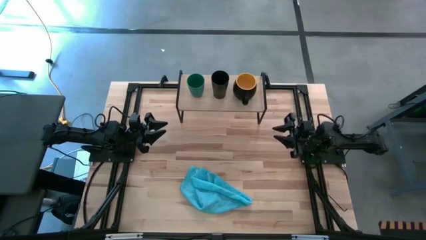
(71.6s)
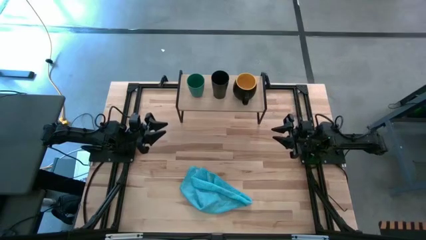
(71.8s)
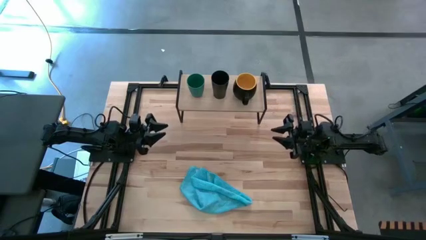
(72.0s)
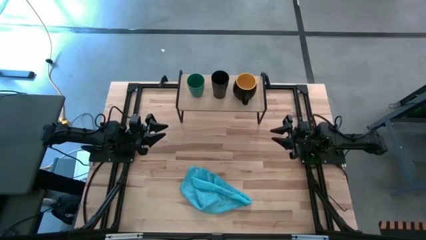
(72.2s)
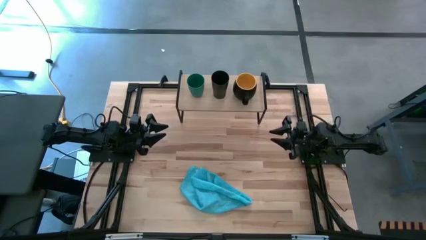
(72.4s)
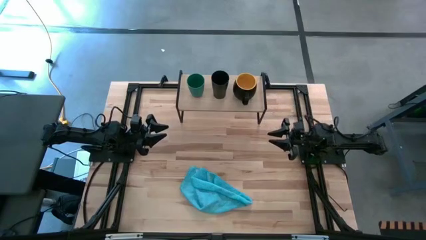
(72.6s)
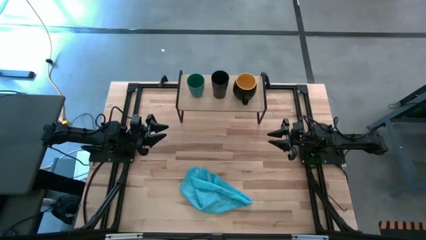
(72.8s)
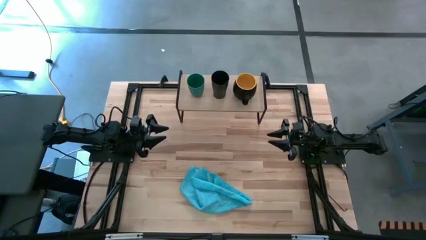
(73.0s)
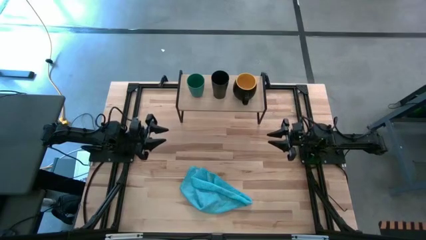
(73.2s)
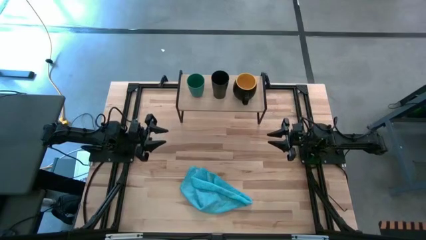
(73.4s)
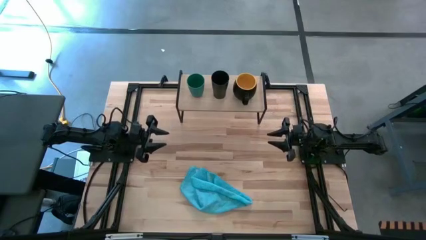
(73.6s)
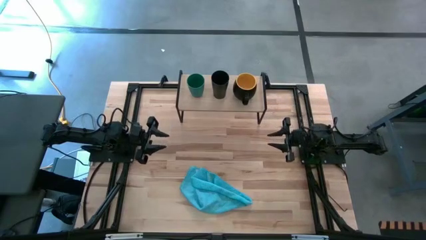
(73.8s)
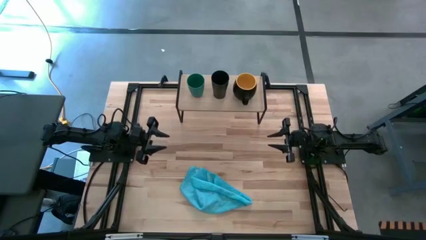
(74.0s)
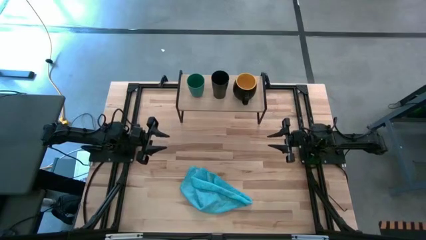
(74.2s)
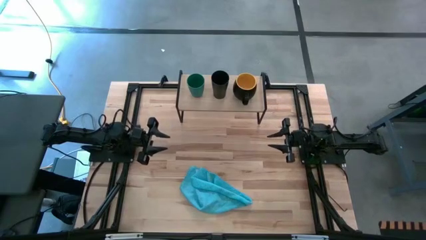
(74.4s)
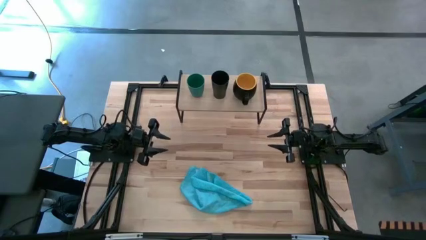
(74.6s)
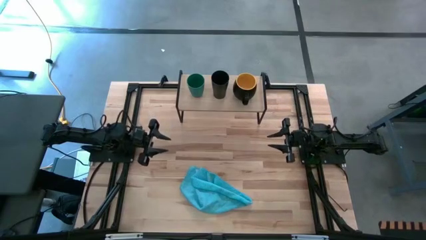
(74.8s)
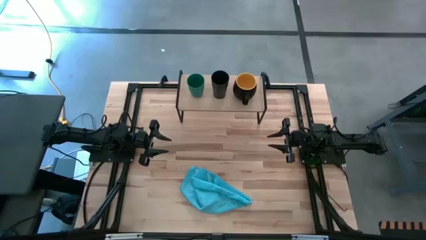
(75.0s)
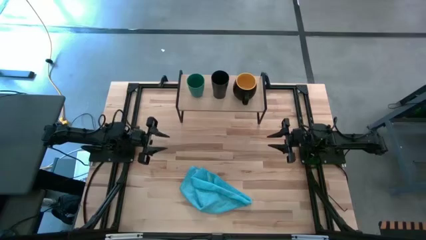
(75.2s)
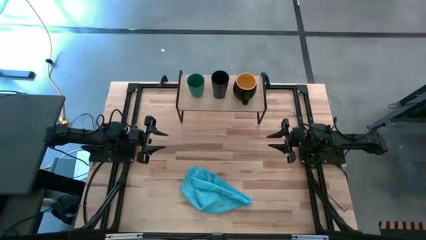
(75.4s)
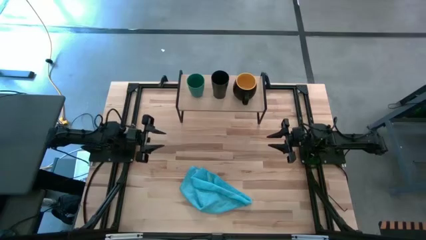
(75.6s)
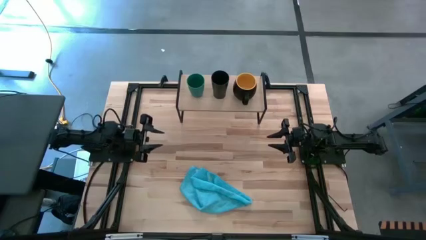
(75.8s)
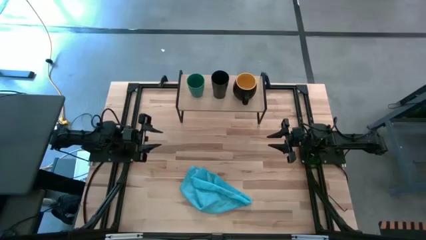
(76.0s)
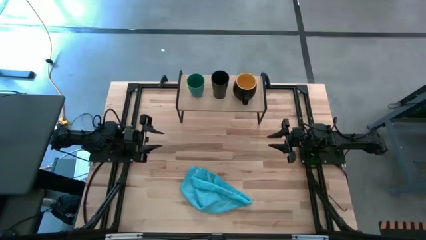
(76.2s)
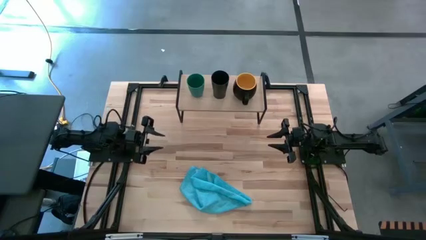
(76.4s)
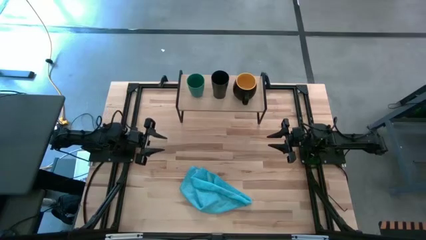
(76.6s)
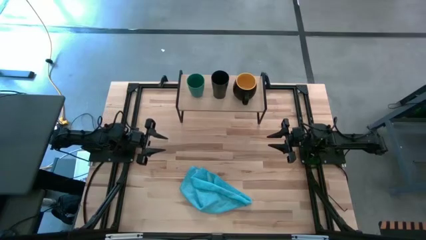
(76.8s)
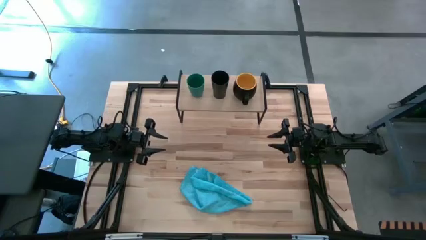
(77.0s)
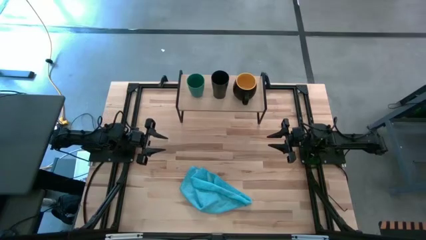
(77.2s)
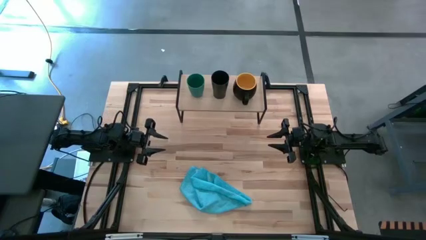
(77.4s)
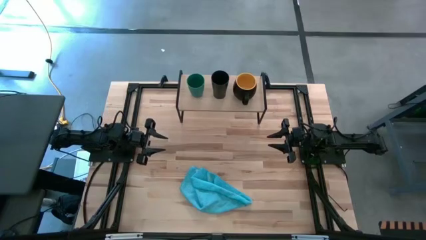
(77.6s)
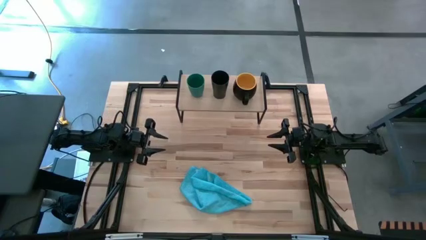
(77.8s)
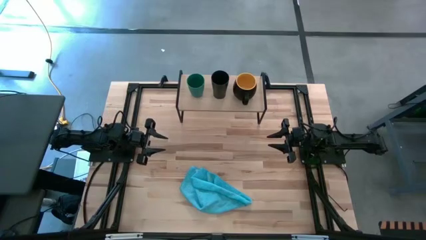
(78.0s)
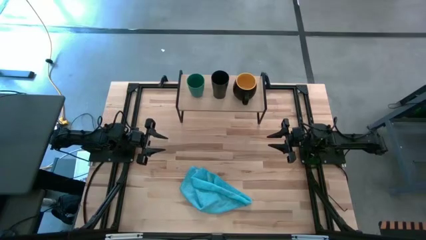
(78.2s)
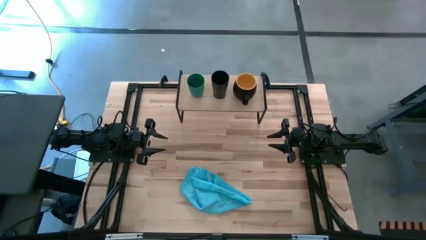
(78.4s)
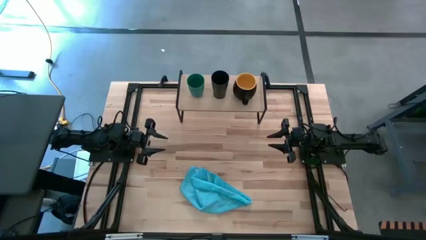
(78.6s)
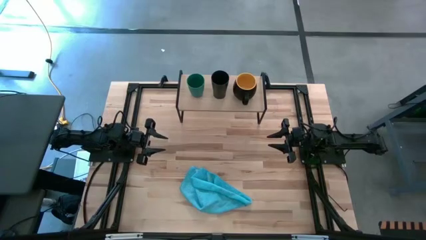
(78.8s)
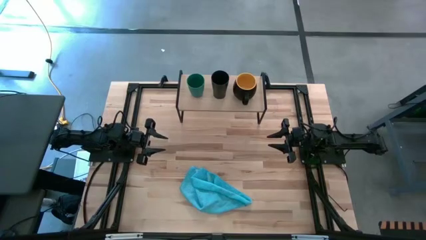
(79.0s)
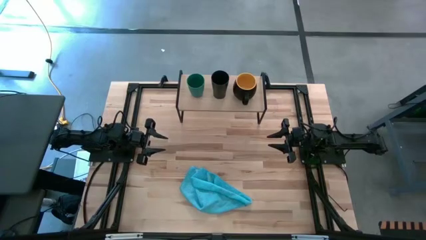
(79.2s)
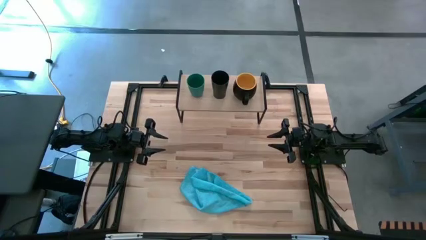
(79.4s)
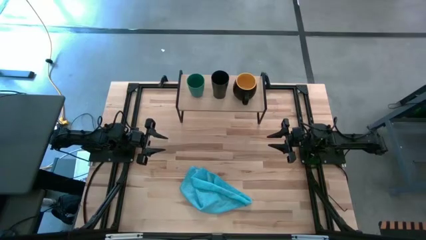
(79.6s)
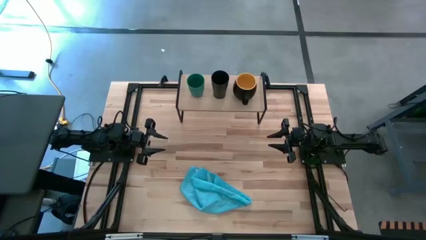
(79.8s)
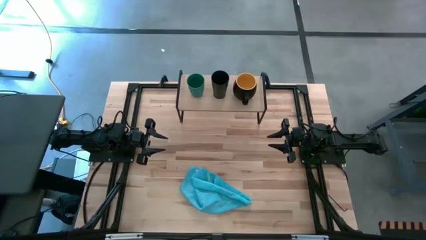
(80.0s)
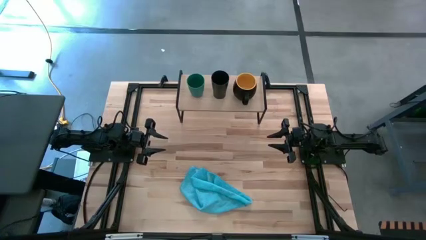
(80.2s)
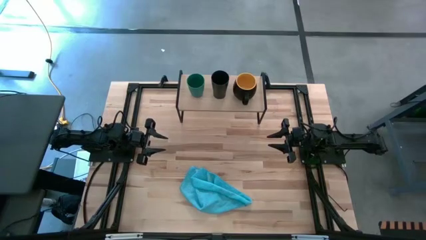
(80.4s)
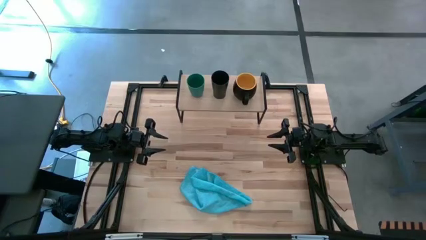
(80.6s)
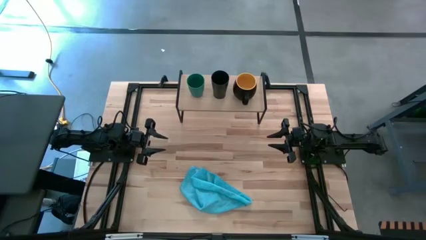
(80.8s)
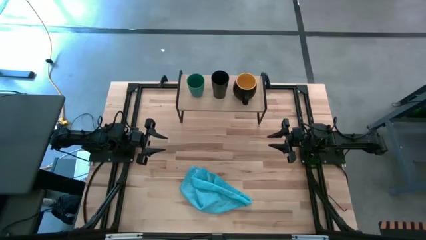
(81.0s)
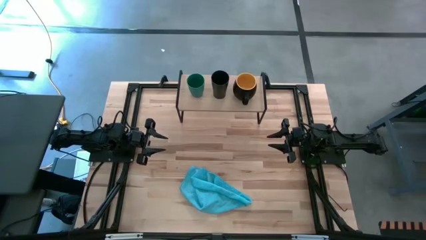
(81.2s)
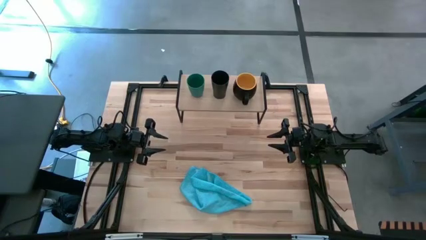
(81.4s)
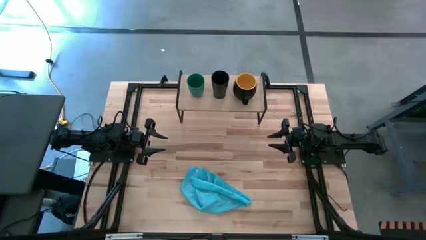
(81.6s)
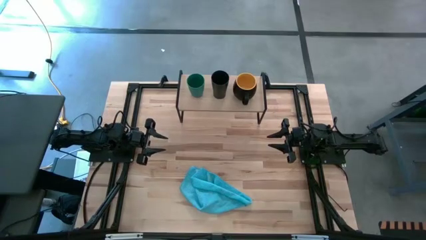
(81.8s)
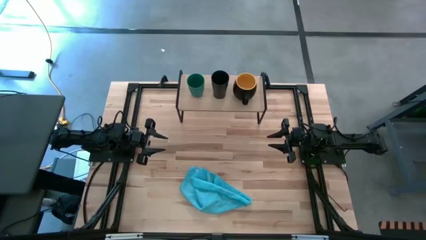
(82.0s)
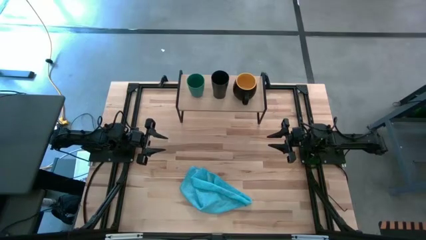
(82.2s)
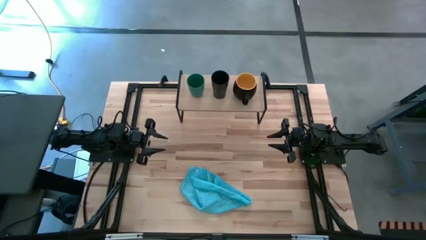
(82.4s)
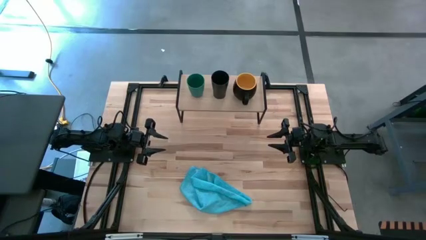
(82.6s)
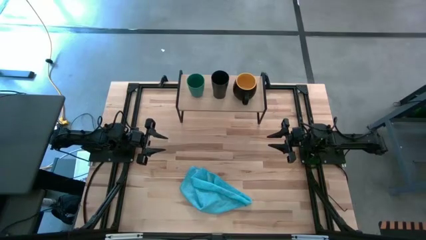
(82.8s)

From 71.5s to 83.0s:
Task: Stack small to large cups/mugs on shelf
Return to Home Position
